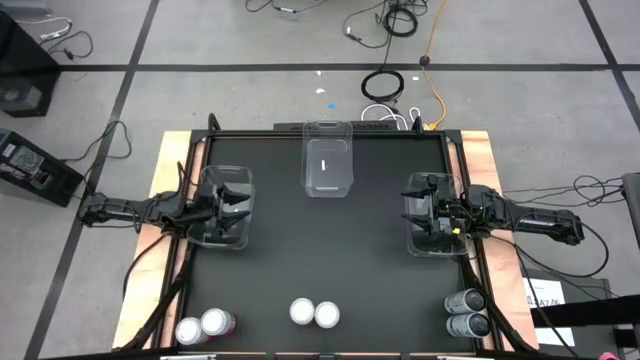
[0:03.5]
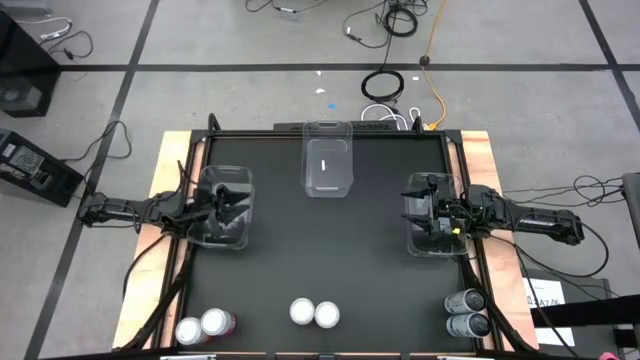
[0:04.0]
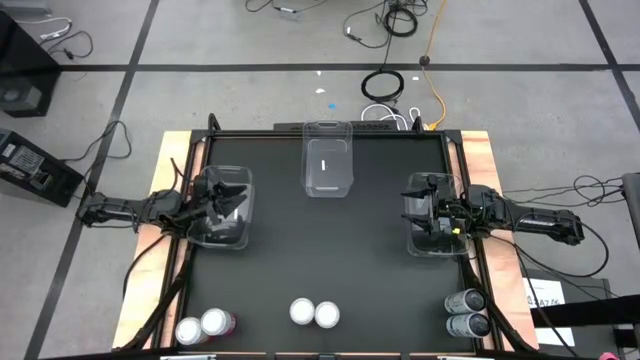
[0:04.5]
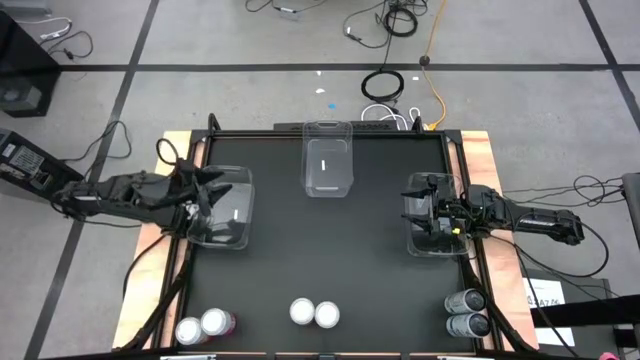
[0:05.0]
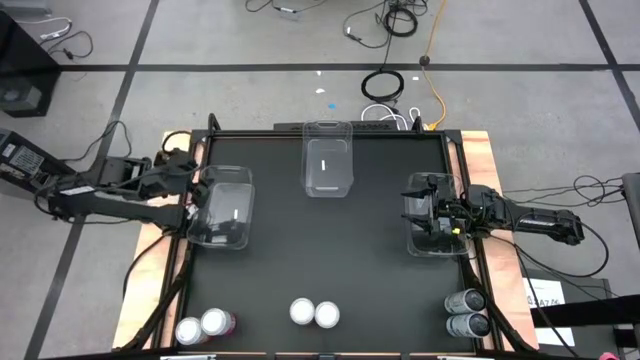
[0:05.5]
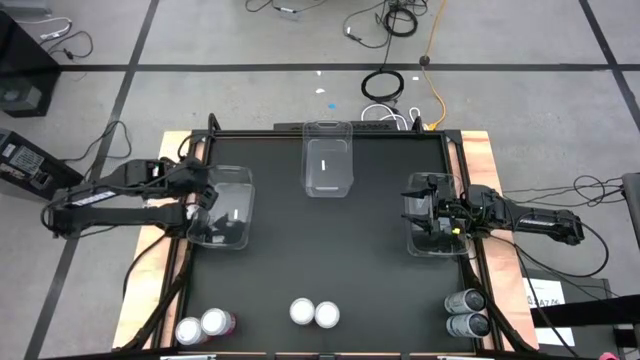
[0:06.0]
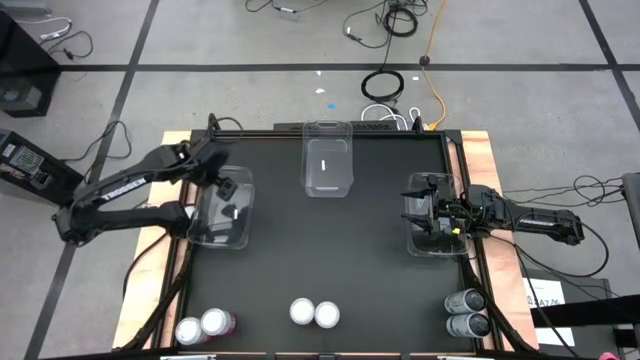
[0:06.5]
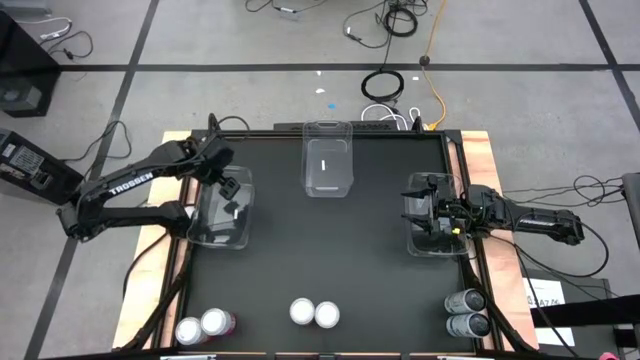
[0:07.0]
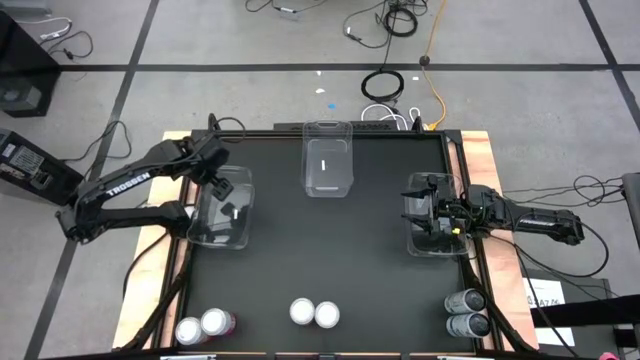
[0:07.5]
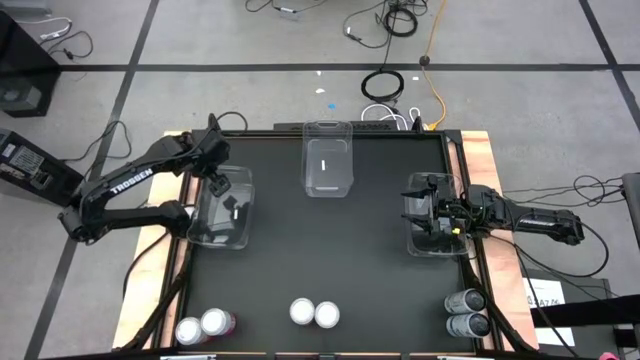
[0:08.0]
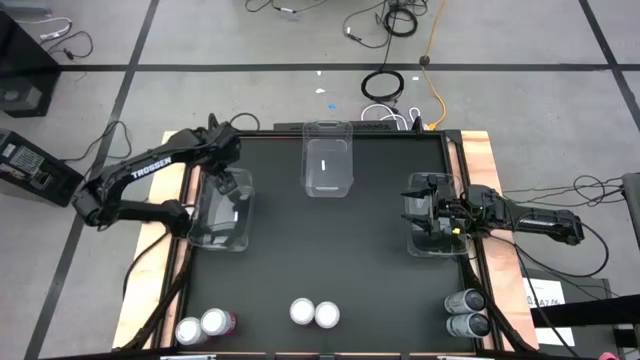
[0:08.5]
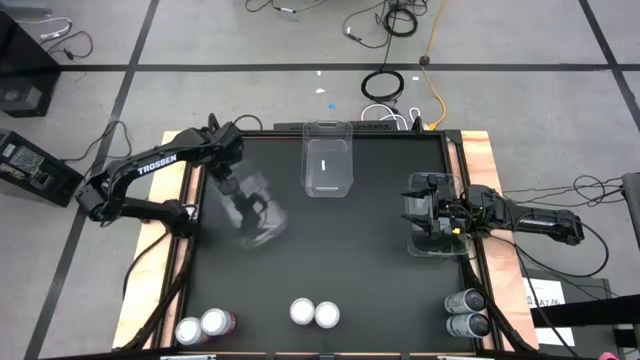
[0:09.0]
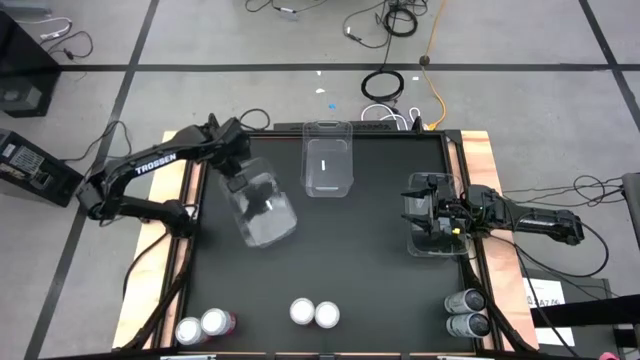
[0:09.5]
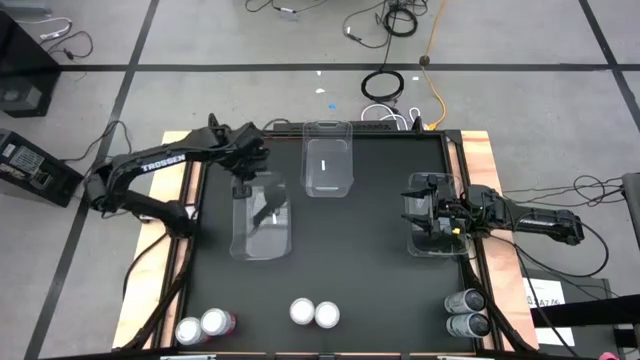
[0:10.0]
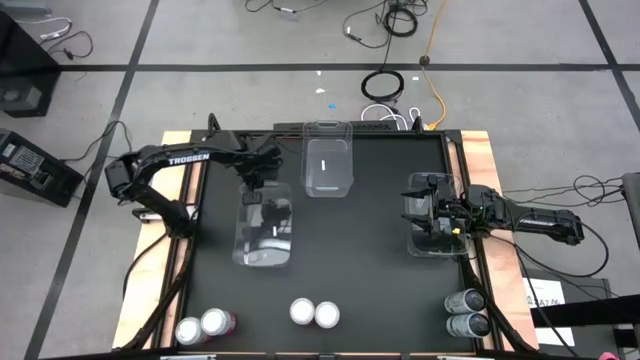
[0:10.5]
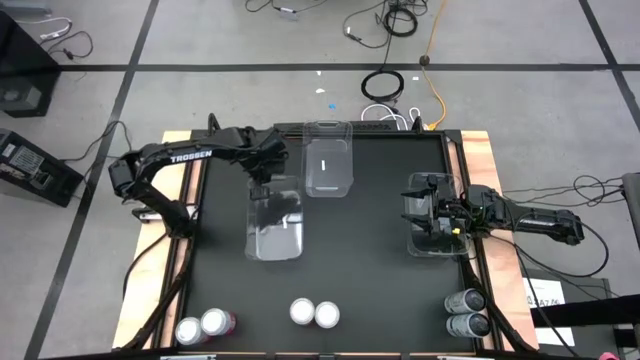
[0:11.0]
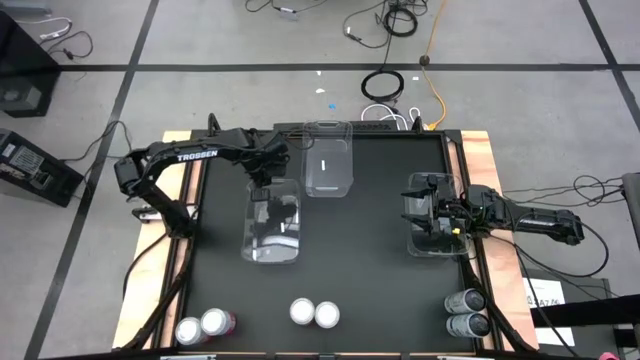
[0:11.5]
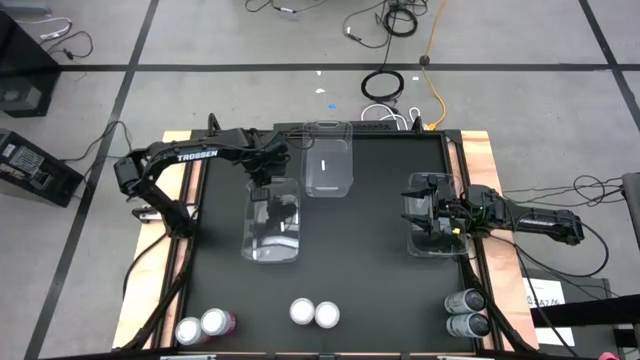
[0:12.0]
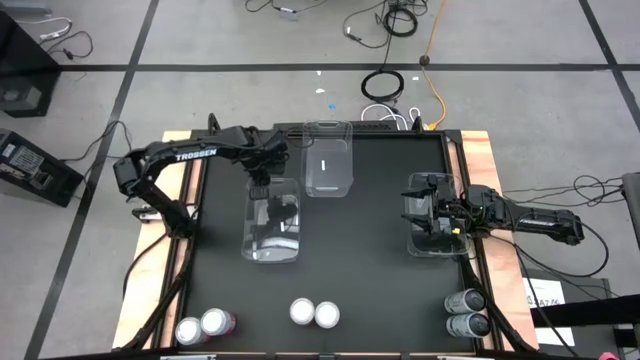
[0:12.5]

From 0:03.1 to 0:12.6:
Task: Sort soda cans
Move the left transparent bin

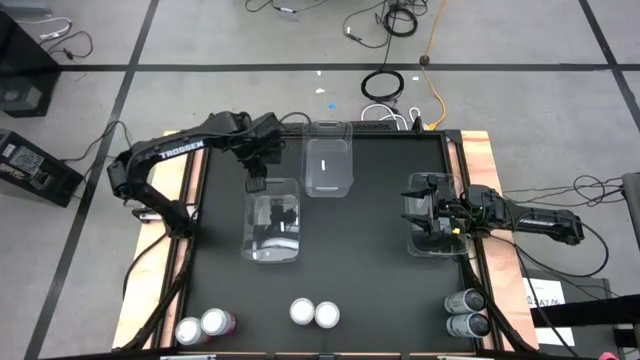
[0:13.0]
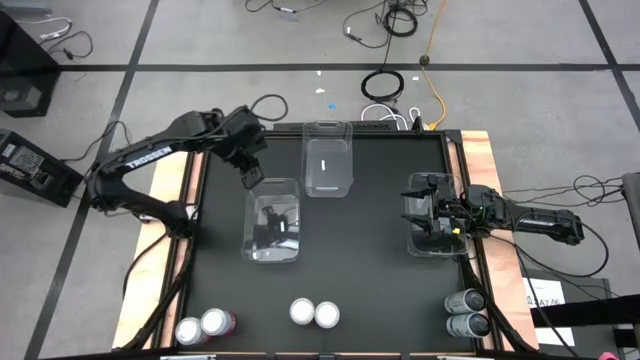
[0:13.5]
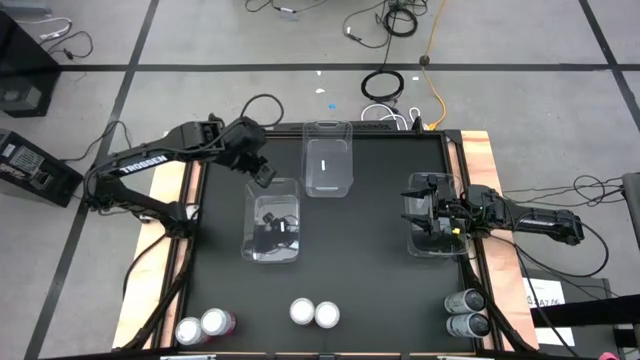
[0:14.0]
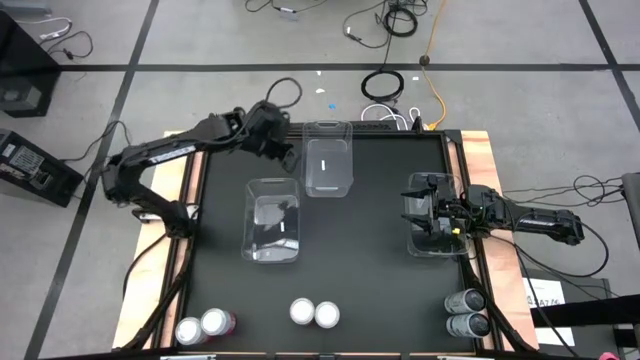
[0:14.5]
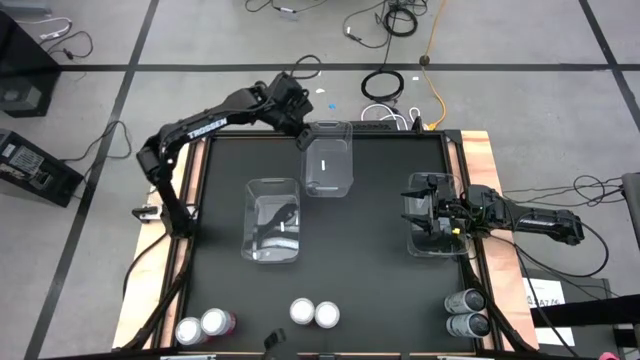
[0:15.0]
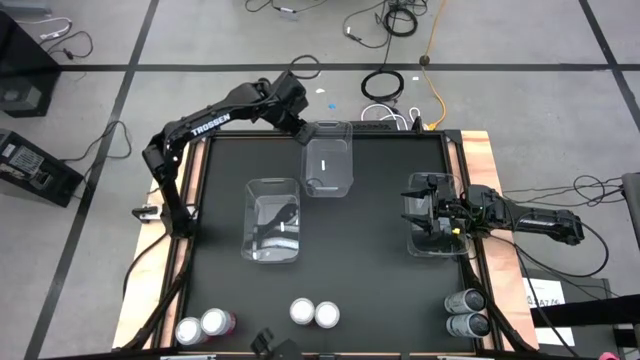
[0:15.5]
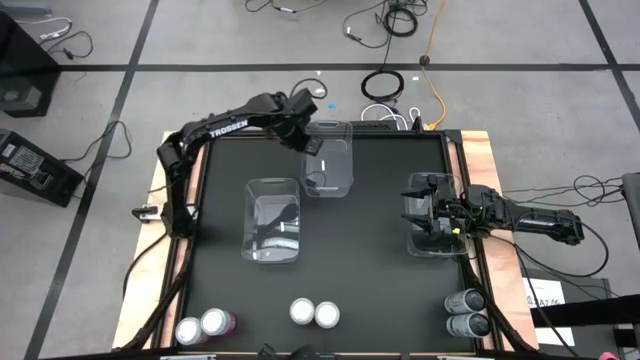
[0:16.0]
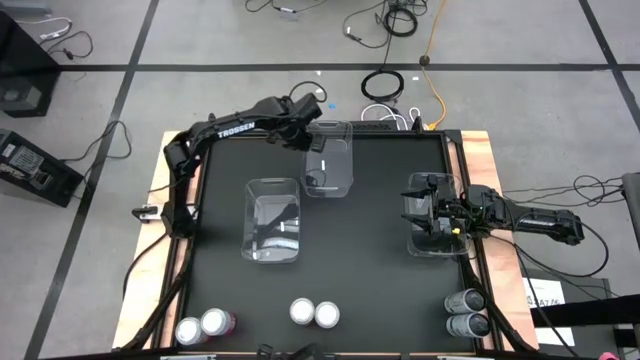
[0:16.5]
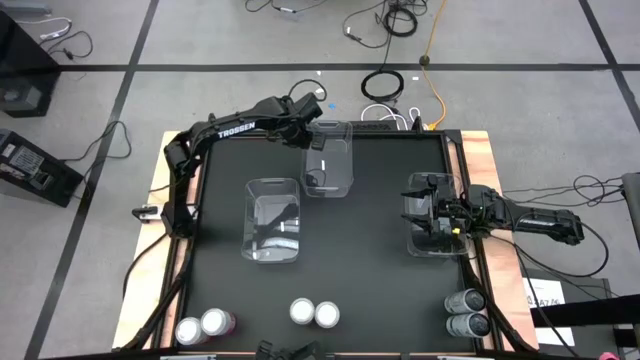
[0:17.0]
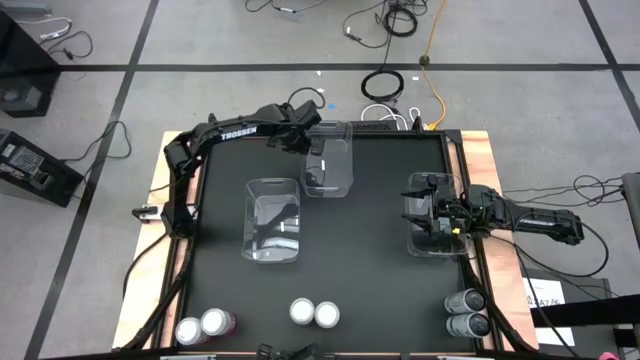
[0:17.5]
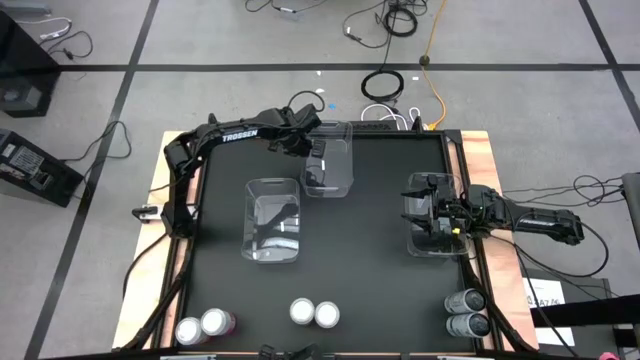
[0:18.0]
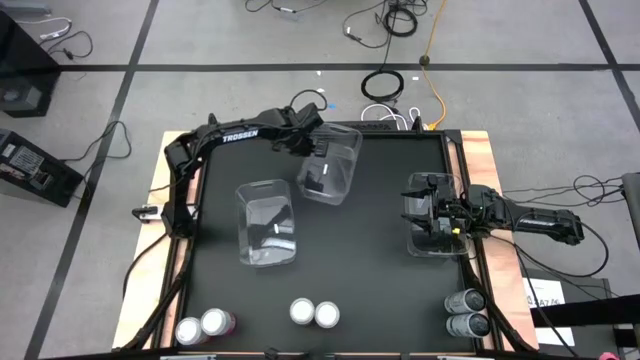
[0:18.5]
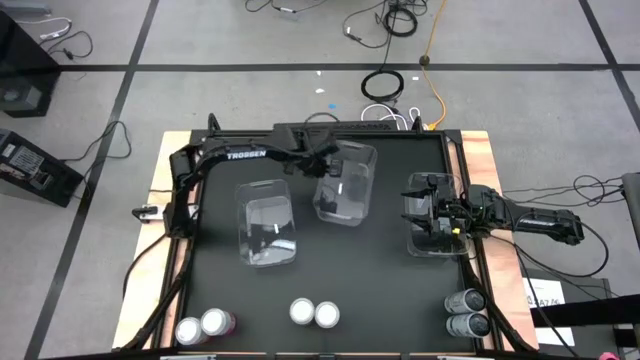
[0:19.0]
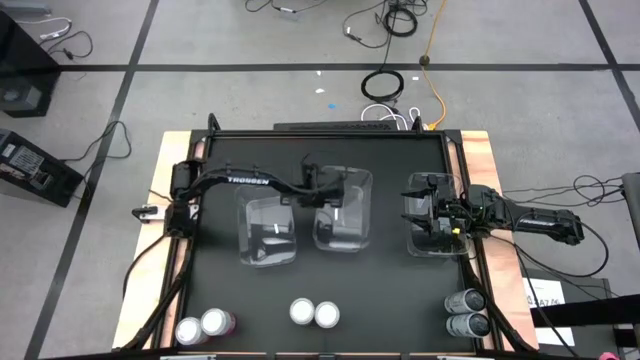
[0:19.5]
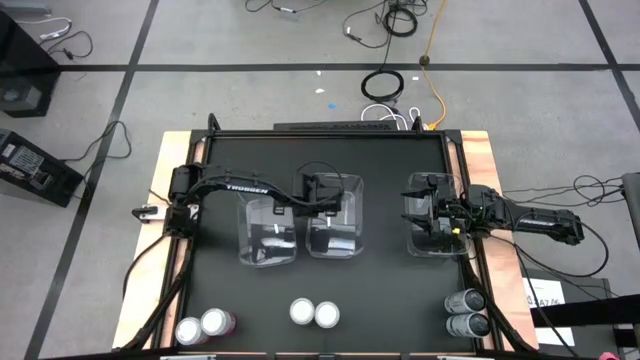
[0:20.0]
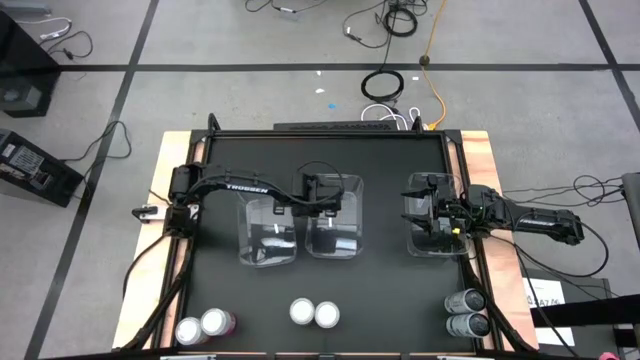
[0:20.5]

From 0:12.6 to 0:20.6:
Move the middle transparent bin

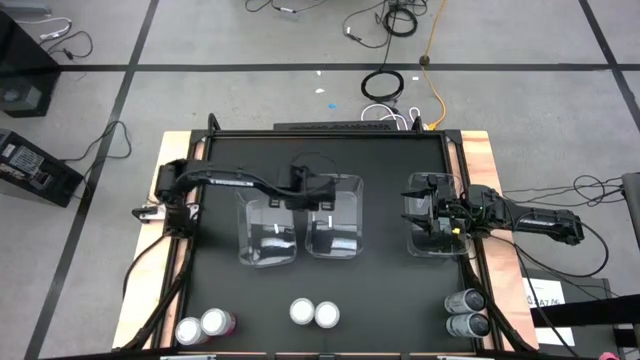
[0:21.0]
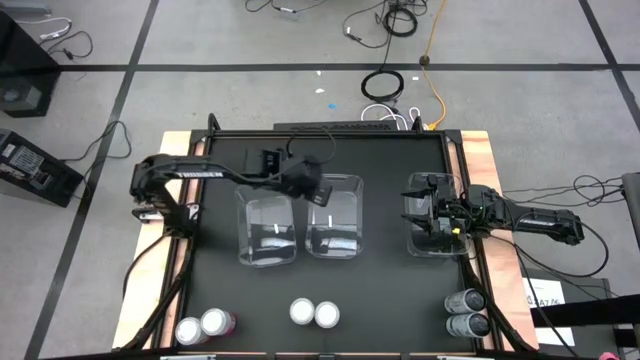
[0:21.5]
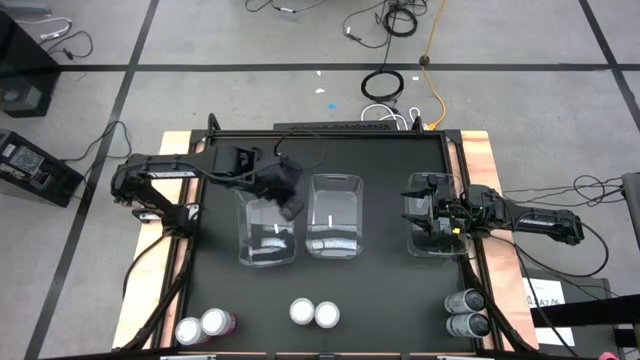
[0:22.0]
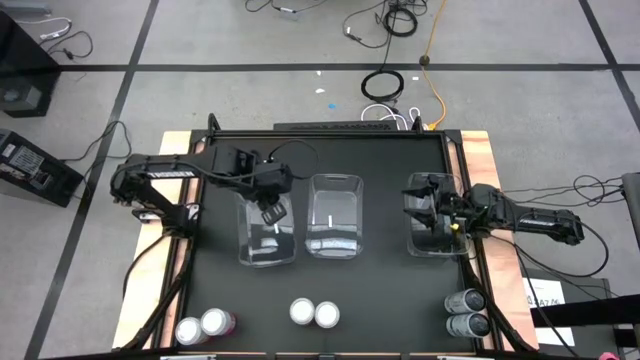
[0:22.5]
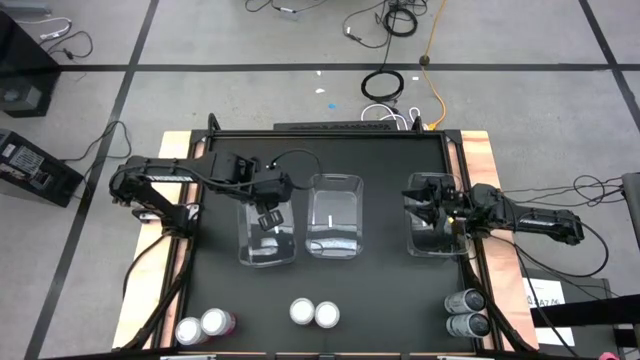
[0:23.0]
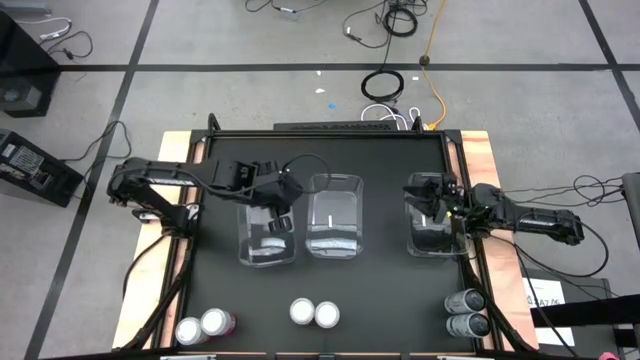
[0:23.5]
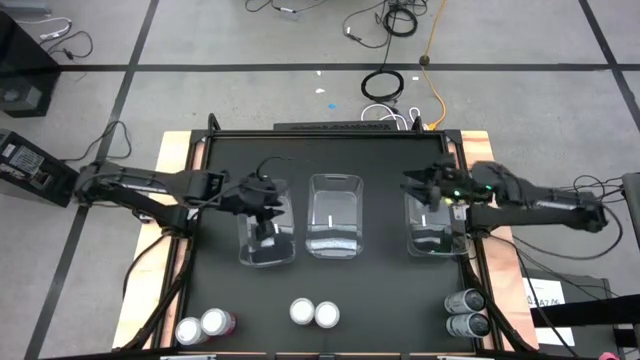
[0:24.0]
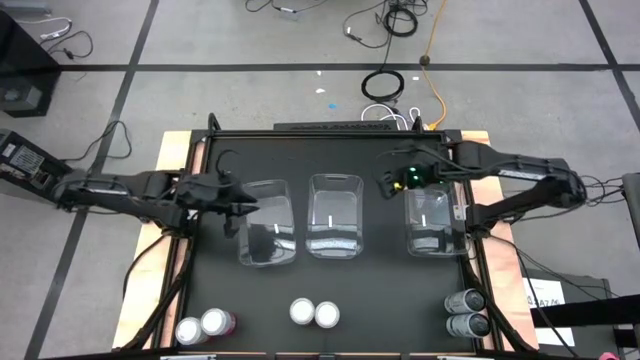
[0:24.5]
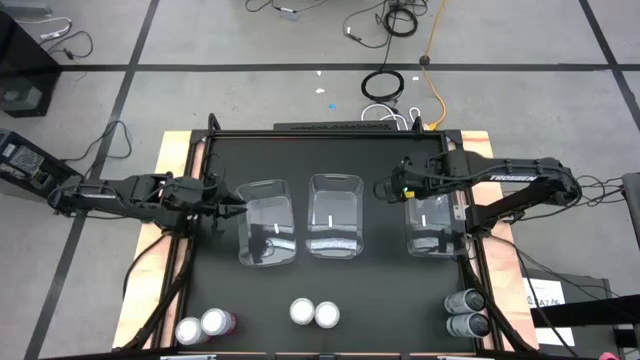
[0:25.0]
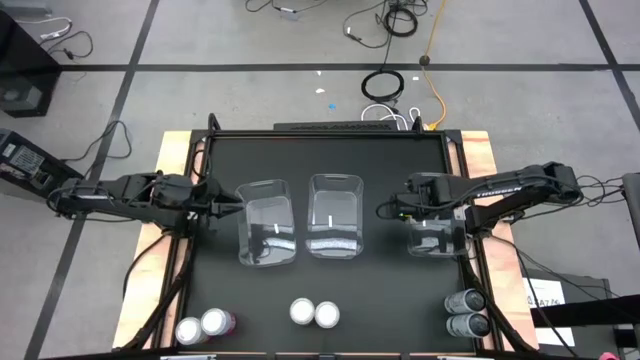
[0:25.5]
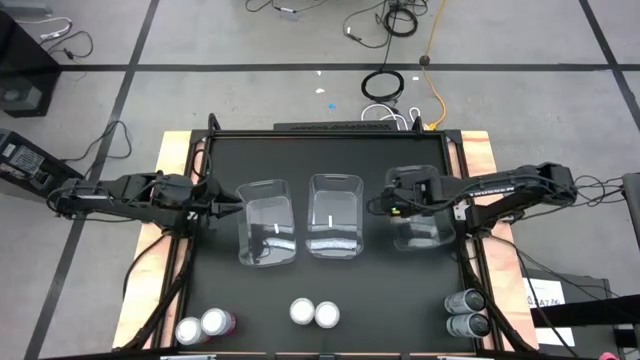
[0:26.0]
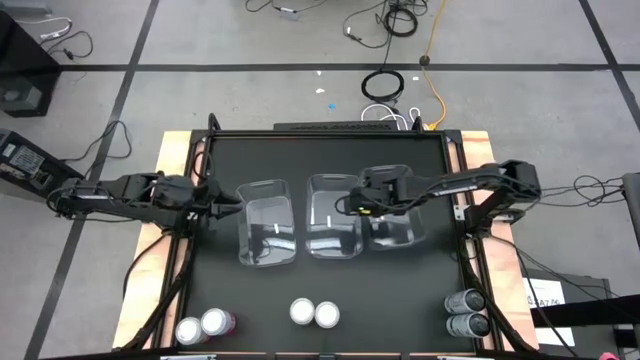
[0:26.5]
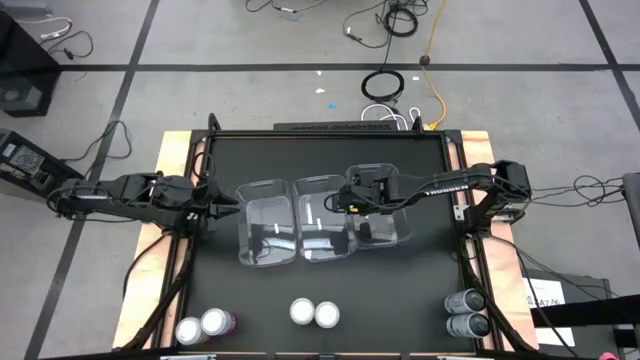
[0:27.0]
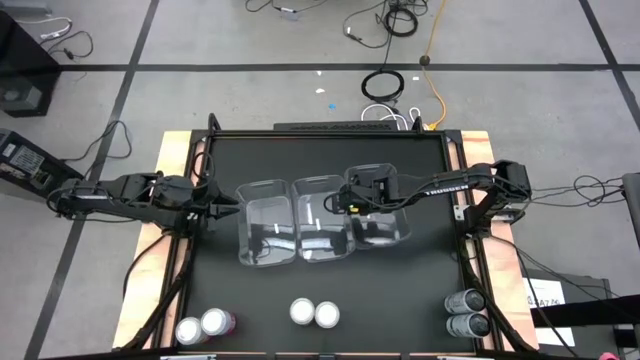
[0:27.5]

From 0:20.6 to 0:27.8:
Move the transparent bin
